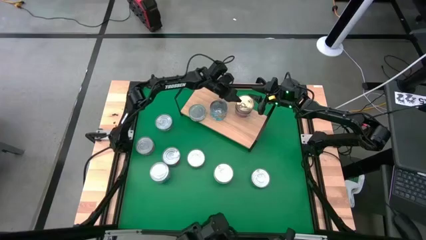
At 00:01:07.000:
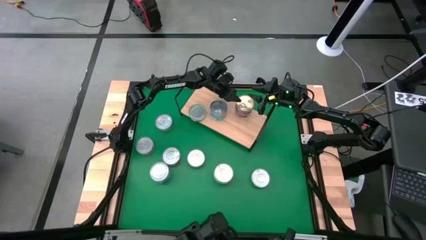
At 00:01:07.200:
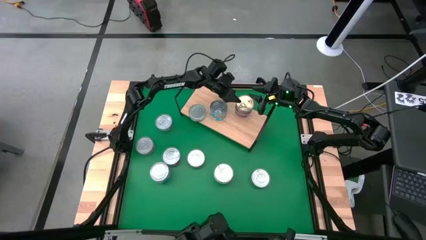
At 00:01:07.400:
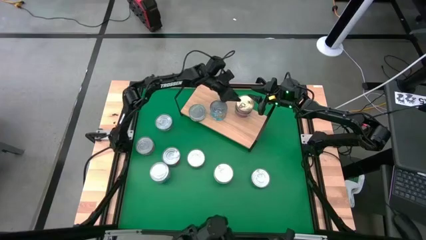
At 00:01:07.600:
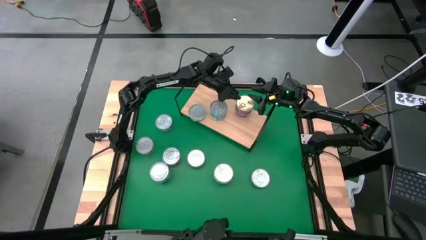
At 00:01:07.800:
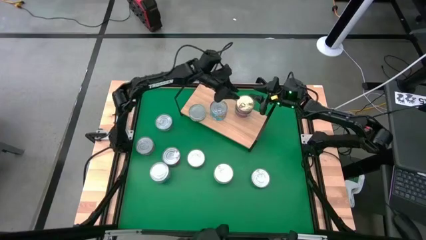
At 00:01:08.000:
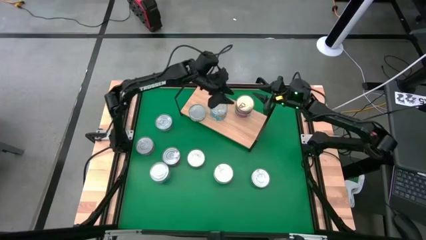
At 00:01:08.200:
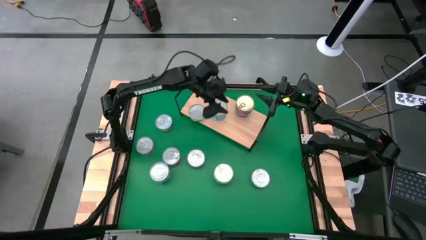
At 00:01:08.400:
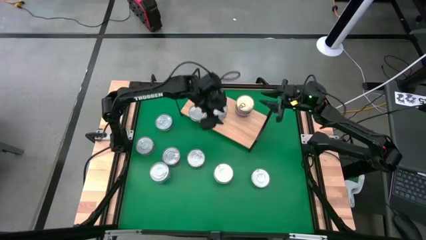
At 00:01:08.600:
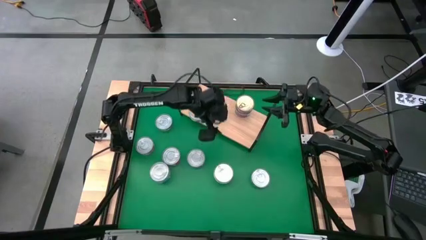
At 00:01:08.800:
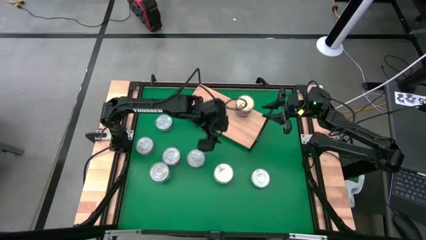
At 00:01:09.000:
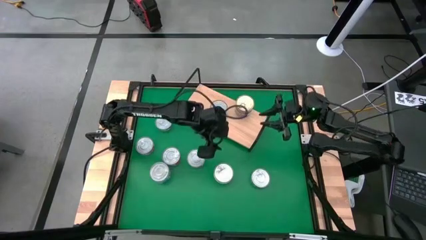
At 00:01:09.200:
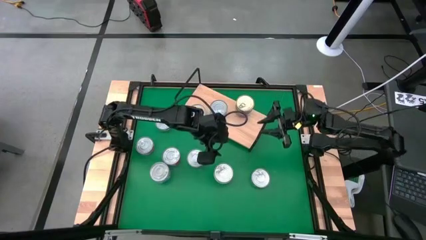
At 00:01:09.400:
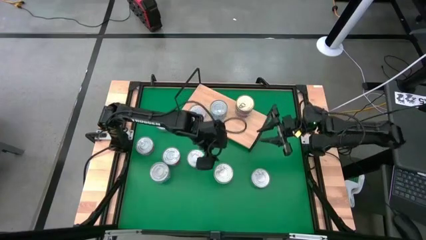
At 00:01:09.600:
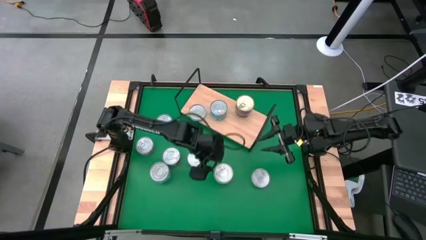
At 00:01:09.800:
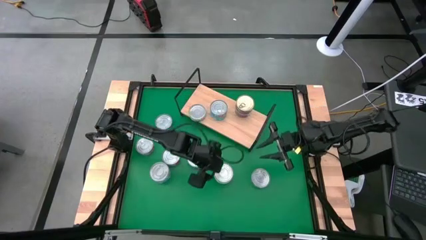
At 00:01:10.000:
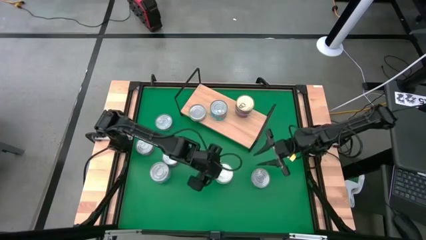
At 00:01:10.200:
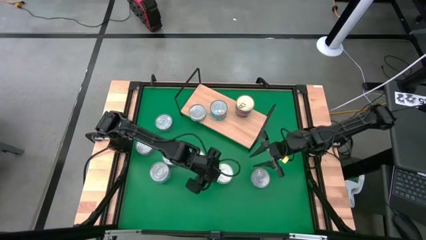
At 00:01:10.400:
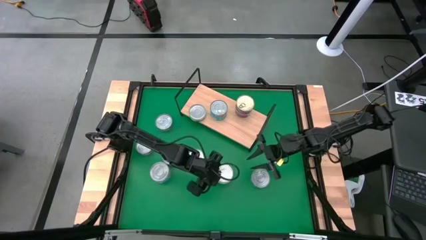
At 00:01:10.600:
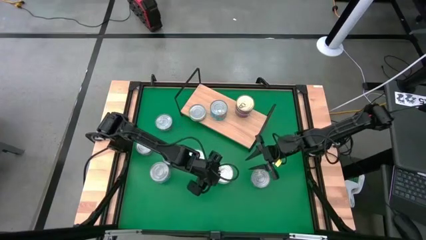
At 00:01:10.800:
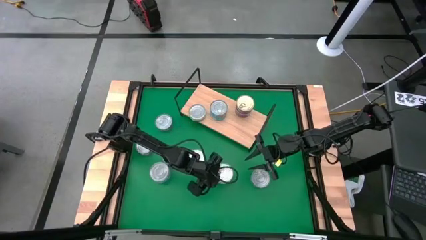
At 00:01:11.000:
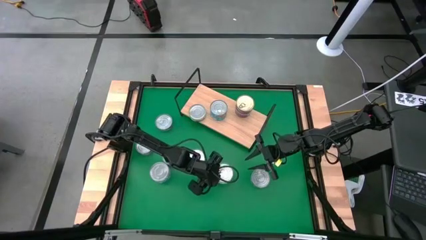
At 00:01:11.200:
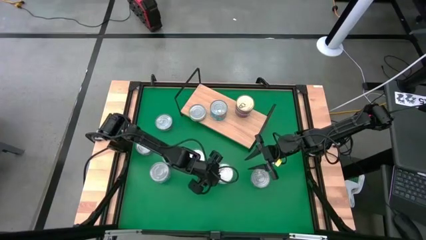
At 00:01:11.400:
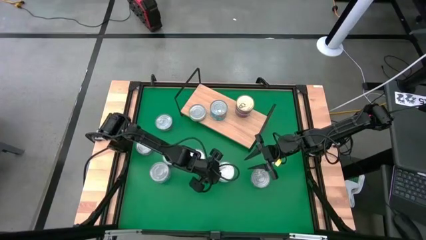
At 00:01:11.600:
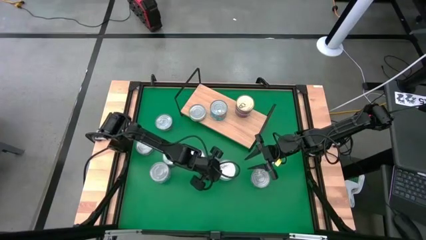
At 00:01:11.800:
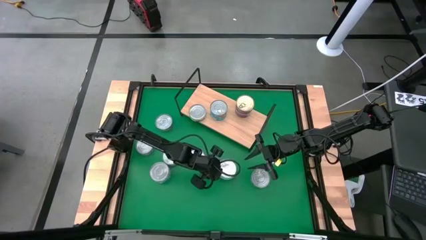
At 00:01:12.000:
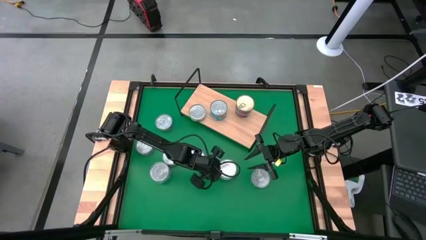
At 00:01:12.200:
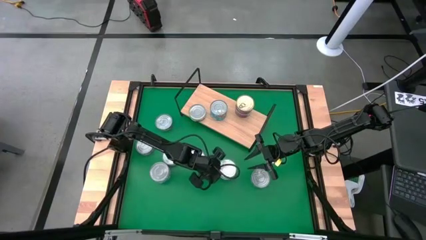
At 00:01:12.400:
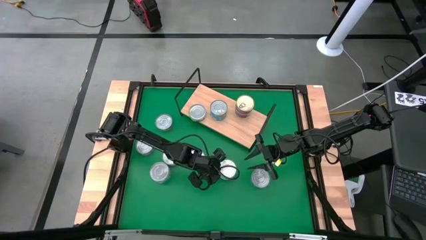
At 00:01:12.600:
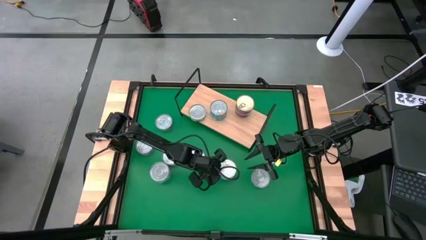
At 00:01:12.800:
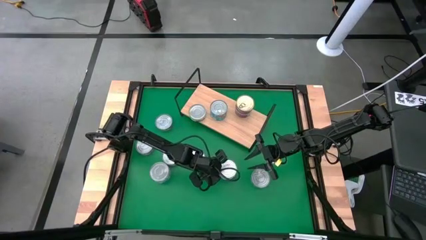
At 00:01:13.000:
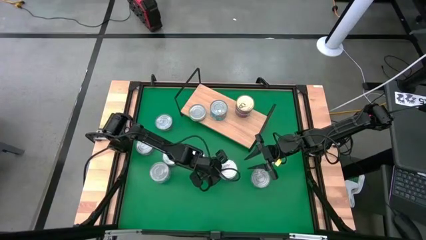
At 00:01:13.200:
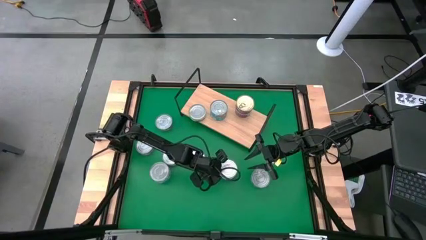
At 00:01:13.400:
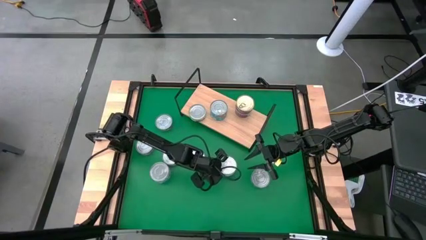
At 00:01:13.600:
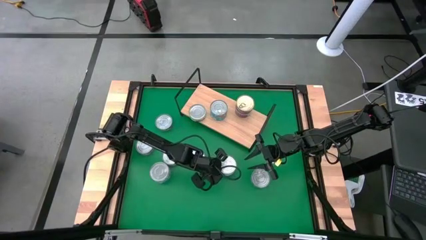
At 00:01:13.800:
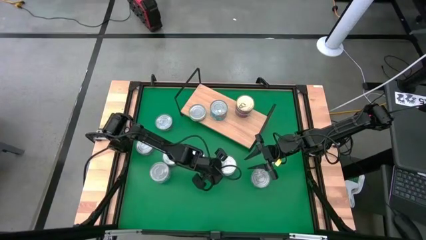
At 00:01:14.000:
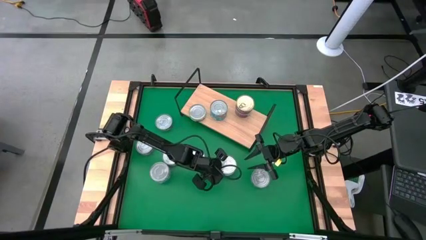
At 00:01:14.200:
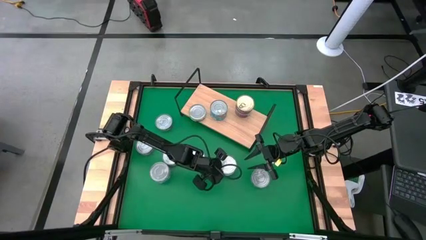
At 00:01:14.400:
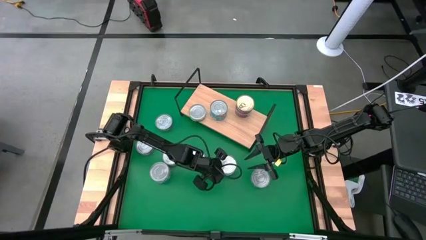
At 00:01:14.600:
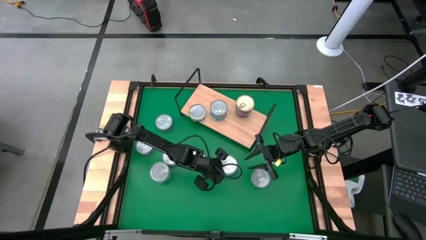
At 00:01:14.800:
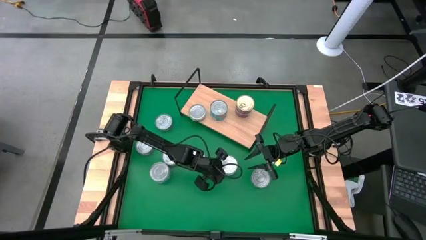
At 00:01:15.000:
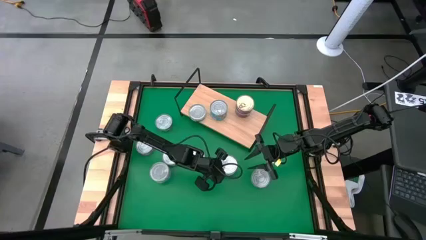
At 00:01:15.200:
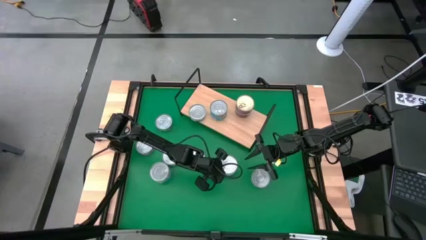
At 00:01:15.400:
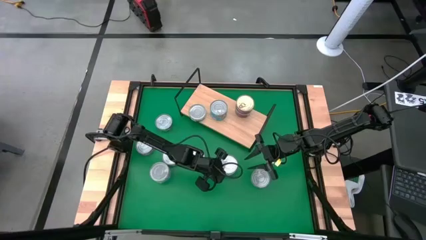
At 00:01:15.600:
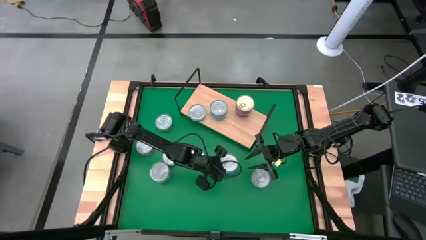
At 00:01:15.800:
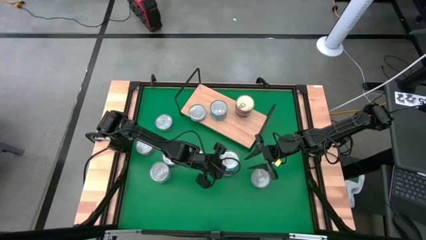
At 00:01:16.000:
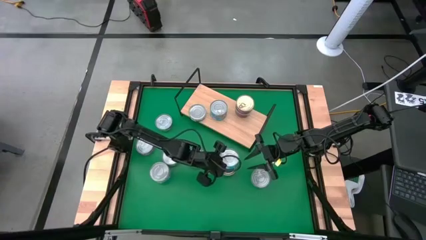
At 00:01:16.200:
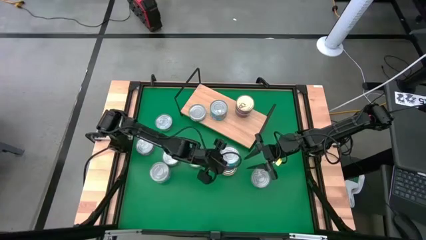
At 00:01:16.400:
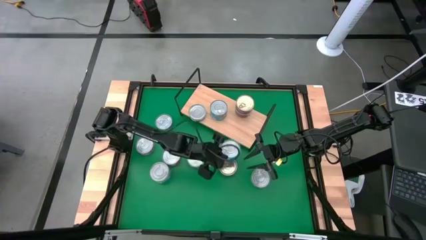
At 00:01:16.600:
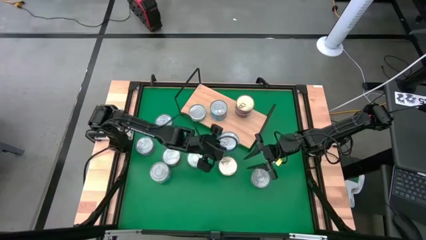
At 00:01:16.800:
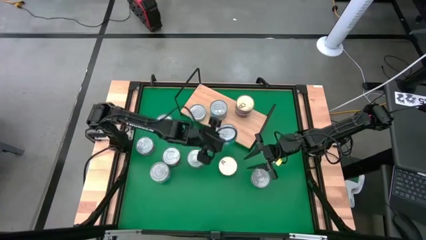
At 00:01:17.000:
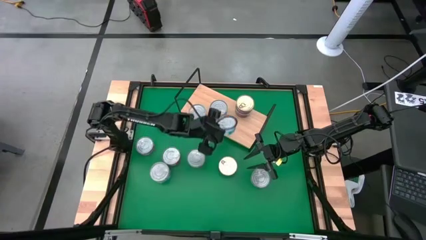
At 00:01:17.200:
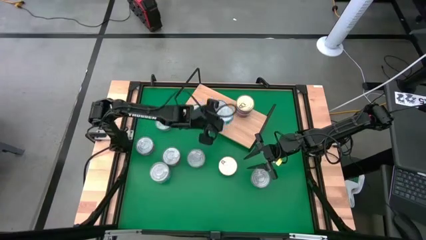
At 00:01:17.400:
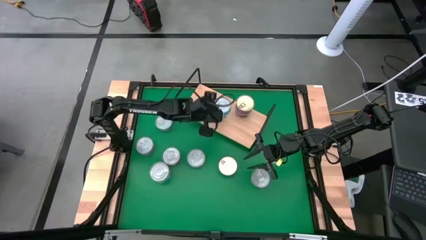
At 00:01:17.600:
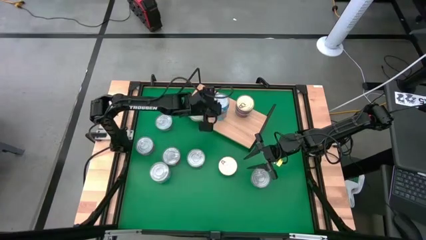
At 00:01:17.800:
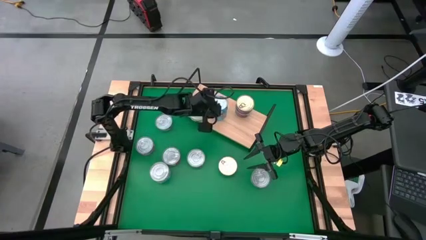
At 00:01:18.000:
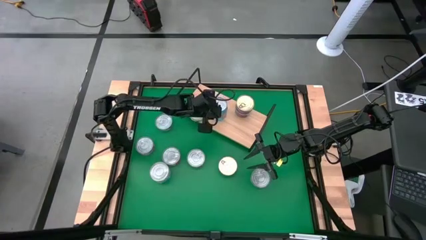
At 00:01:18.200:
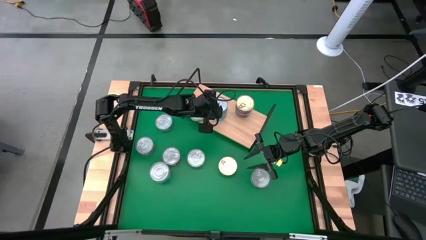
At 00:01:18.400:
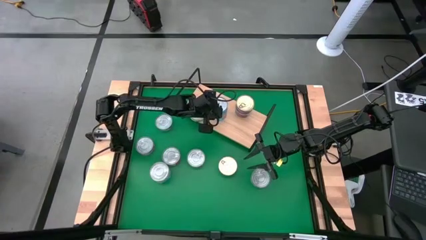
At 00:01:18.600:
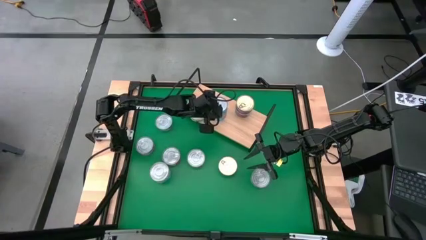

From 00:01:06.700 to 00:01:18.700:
Task: Stack canned seafood by type on shelf
Stack the yellow-blue tuna can on top of the yellow-blue tuna can on the shelf

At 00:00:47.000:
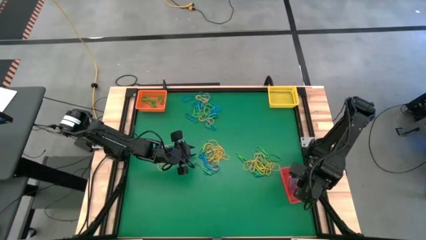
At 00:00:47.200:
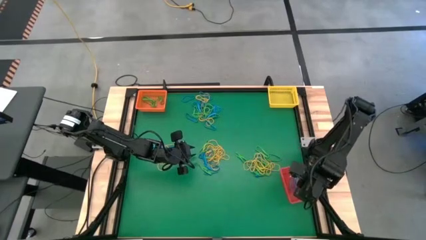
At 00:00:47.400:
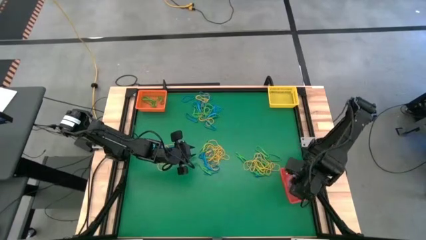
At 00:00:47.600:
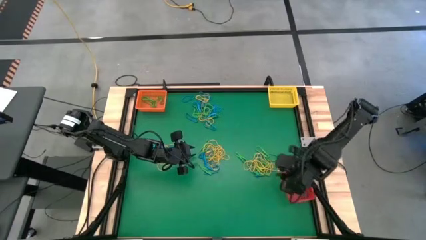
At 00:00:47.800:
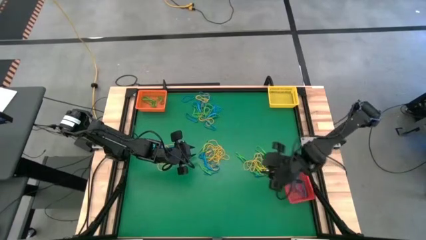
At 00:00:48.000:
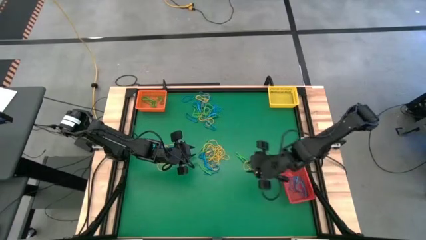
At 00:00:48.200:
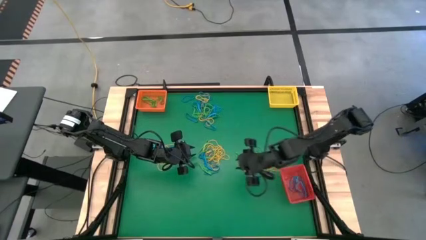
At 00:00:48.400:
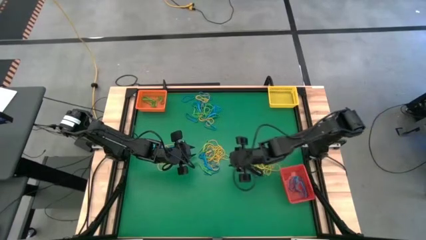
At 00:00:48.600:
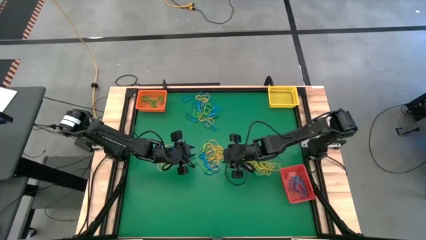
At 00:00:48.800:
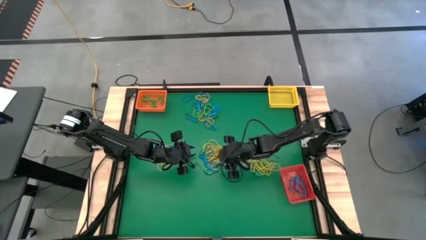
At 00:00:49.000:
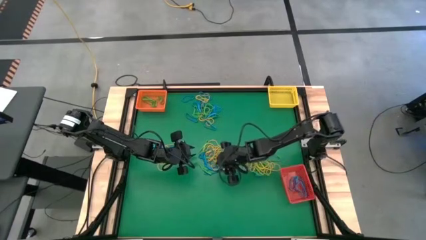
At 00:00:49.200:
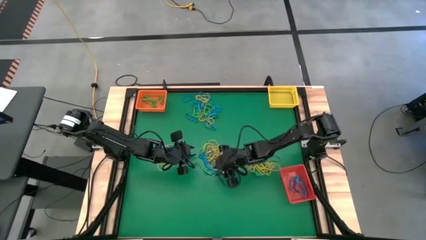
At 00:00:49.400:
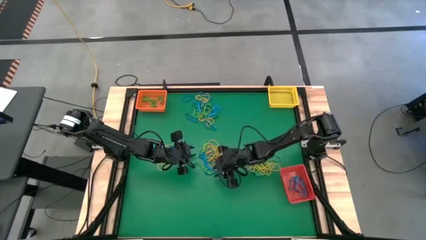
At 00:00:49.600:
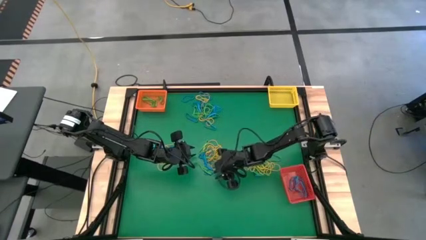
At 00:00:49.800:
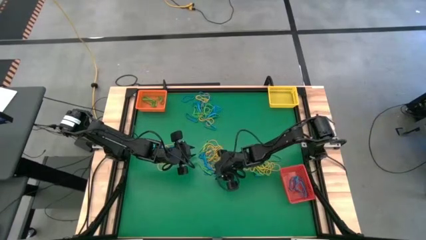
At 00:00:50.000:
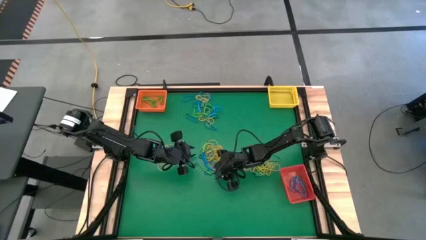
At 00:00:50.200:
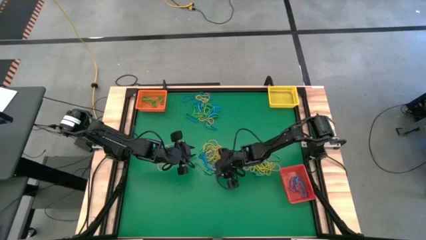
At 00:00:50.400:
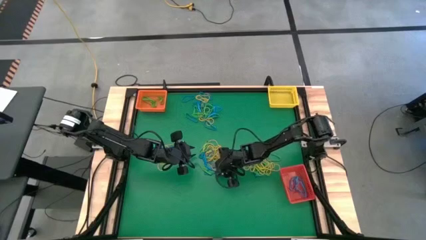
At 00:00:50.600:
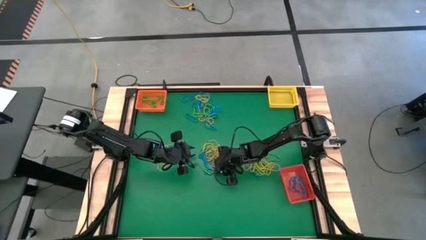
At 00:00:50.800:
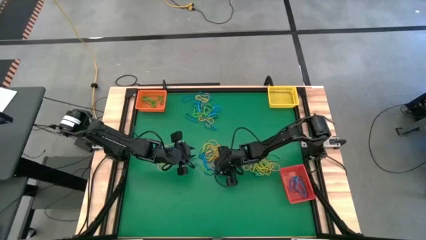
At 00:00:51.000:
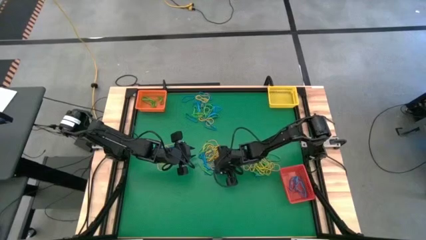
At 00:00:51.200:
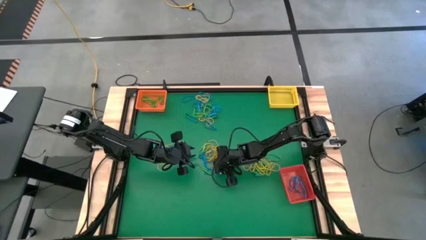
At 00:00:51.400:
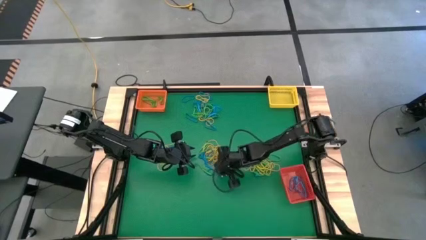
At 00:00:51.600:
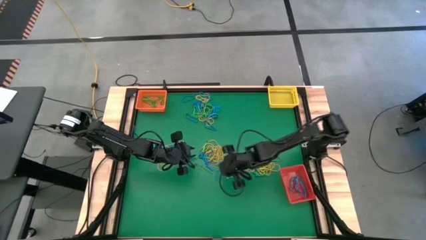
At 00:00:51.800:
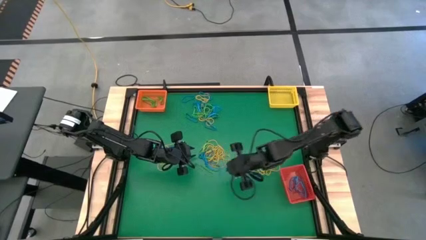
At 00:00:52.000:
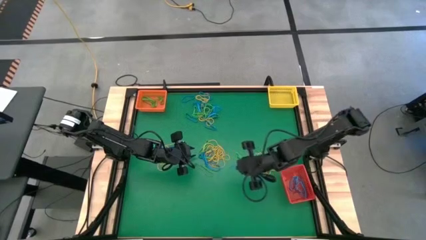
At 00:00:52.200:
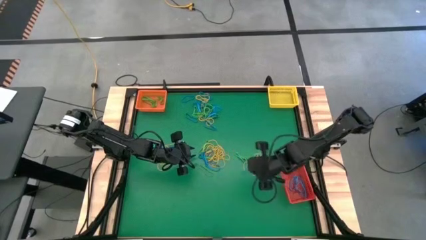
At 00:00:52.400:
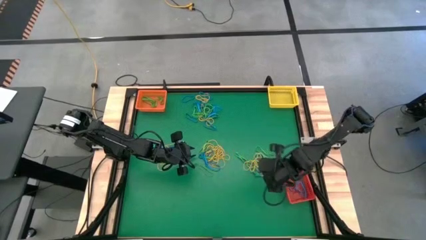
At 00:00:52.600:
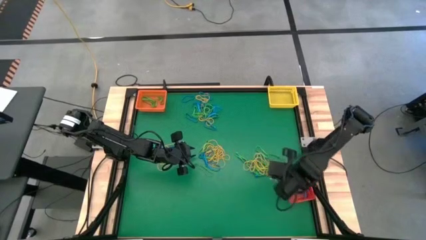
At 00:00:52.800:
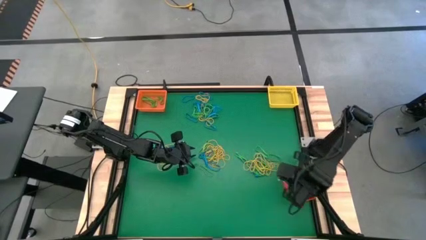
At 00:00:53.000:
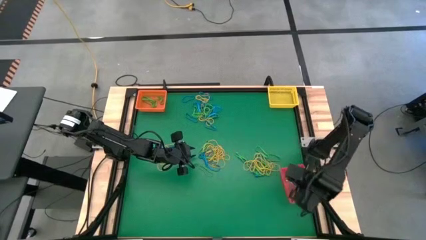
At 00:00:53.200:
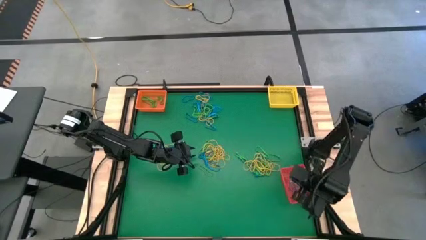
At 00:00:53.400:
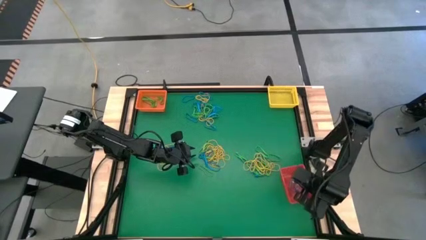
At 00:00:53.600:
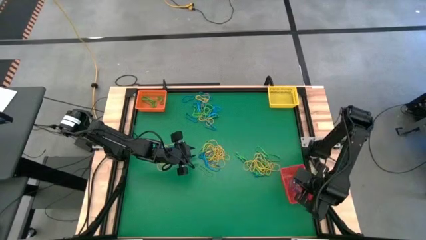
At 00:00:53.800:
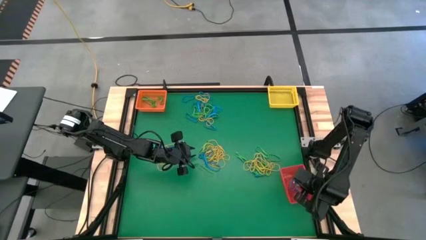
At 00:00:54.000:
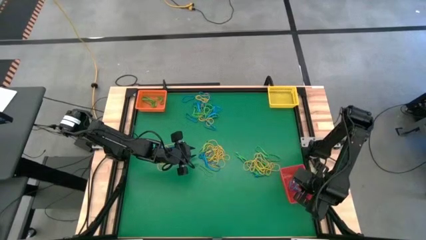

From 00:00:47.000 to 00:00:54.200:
Task: Sort rubber bands into baskets
Put the blue rubber band into the red bin
